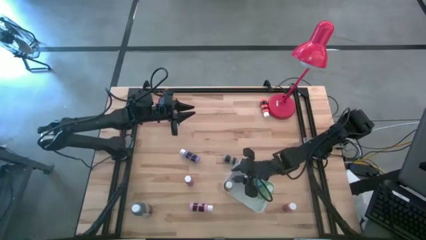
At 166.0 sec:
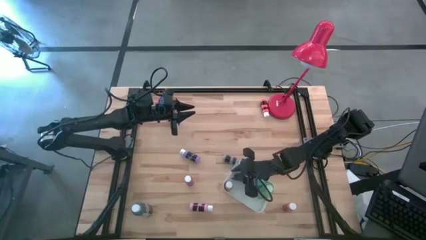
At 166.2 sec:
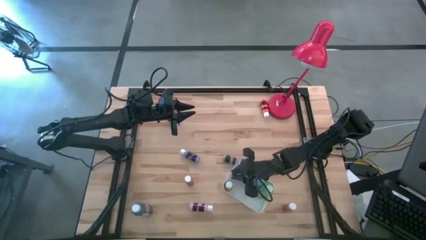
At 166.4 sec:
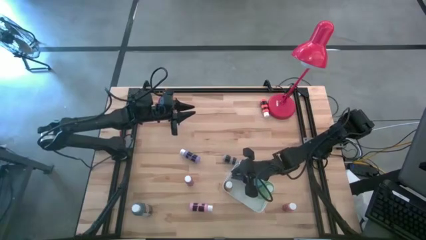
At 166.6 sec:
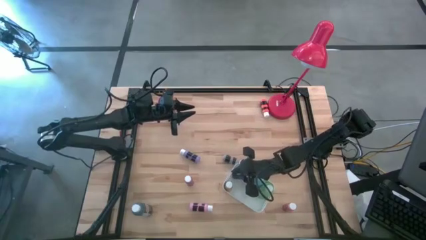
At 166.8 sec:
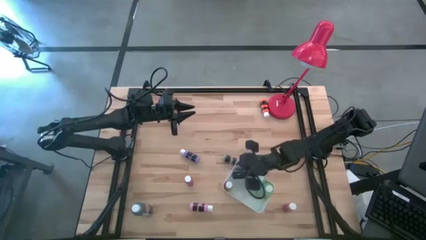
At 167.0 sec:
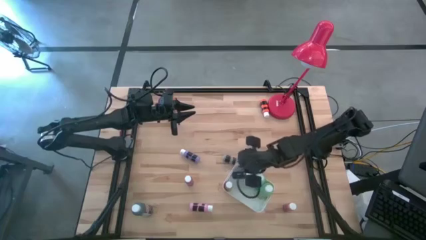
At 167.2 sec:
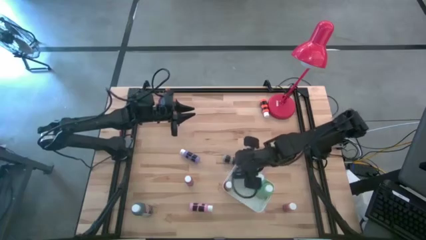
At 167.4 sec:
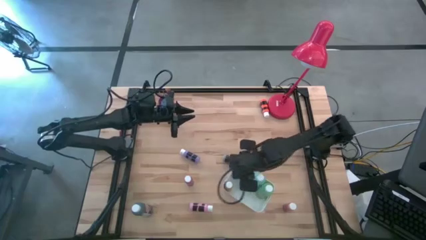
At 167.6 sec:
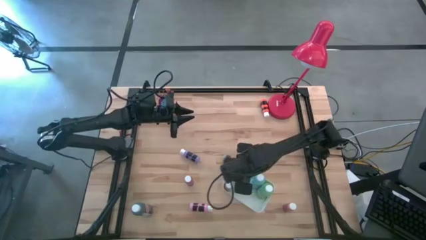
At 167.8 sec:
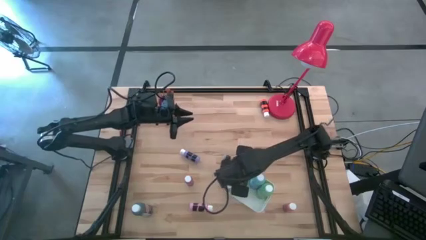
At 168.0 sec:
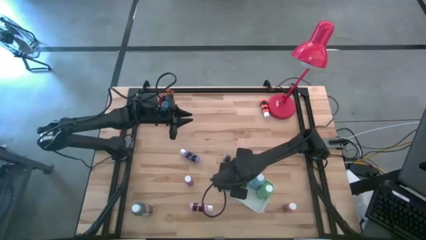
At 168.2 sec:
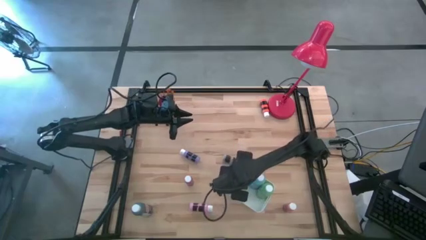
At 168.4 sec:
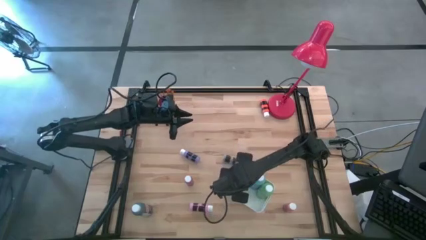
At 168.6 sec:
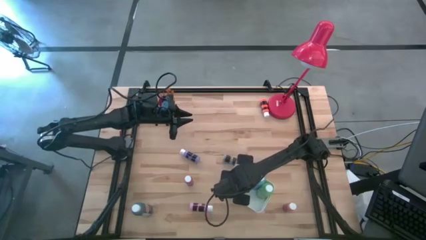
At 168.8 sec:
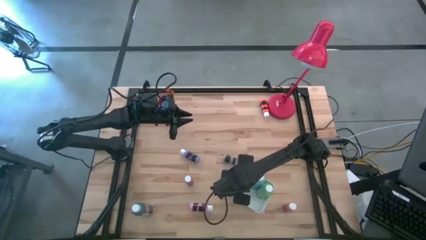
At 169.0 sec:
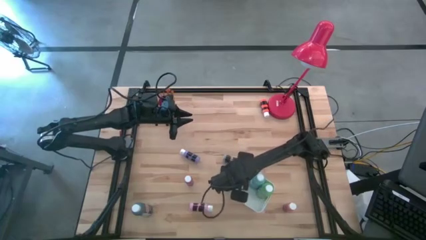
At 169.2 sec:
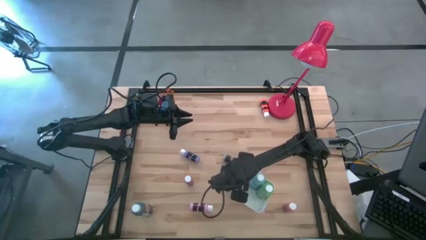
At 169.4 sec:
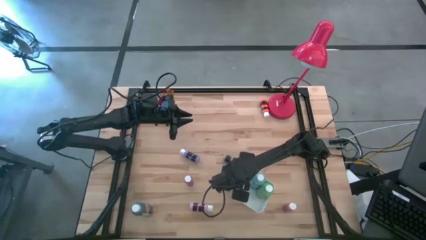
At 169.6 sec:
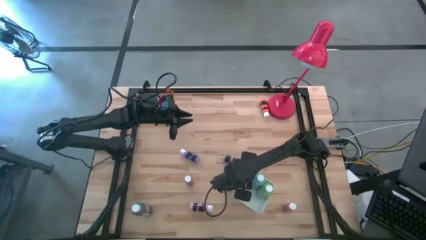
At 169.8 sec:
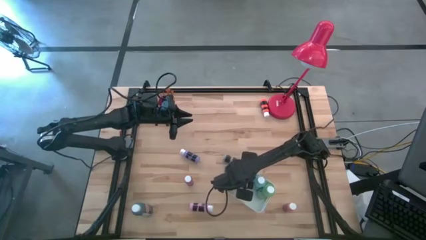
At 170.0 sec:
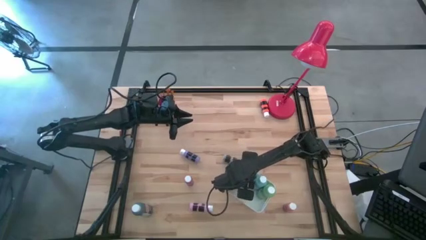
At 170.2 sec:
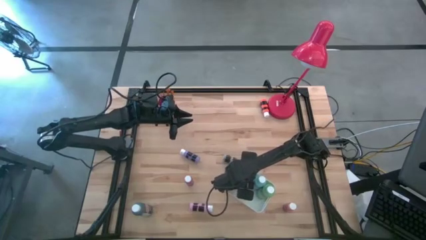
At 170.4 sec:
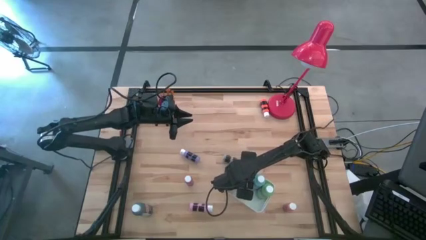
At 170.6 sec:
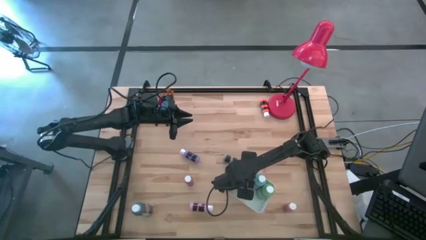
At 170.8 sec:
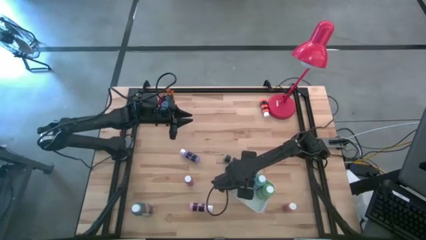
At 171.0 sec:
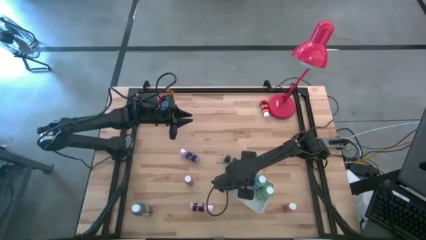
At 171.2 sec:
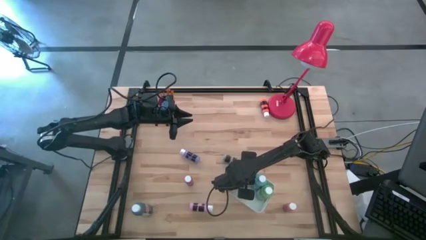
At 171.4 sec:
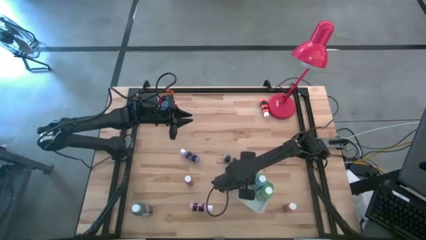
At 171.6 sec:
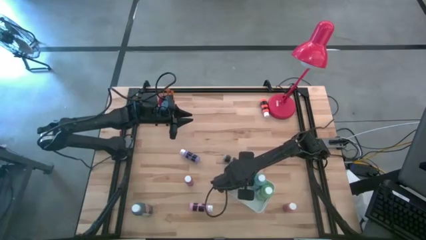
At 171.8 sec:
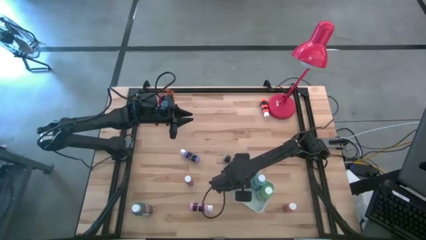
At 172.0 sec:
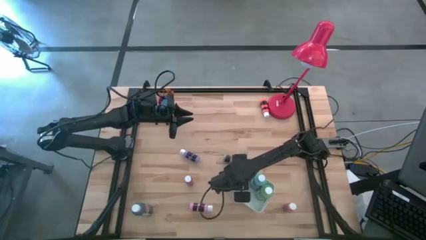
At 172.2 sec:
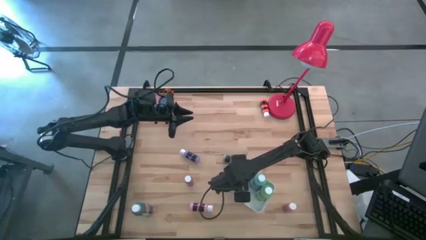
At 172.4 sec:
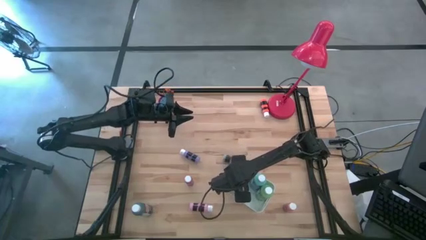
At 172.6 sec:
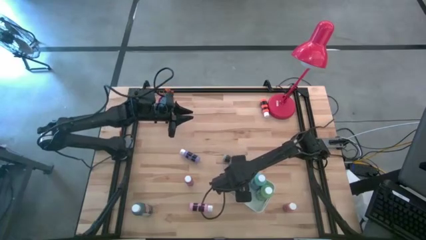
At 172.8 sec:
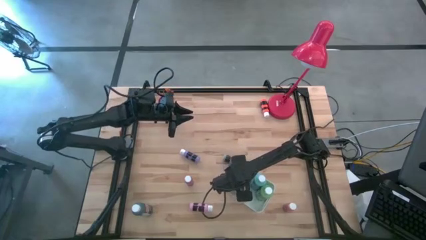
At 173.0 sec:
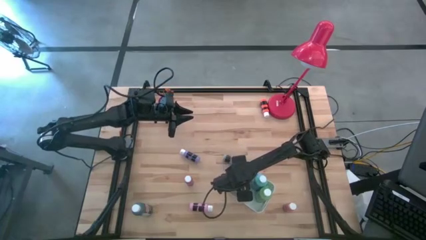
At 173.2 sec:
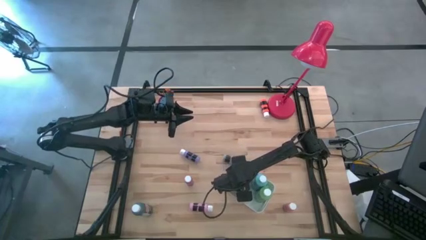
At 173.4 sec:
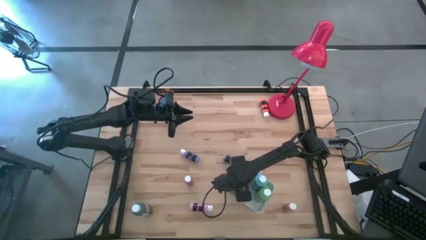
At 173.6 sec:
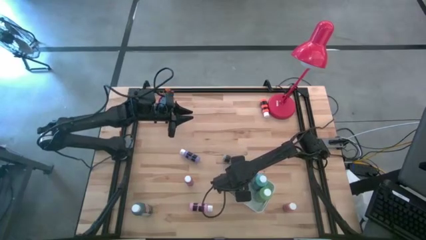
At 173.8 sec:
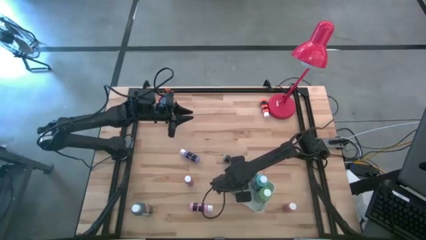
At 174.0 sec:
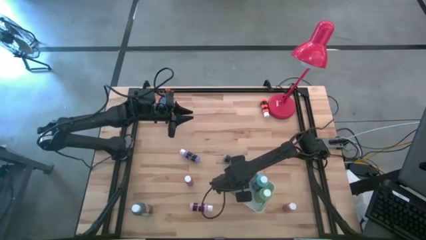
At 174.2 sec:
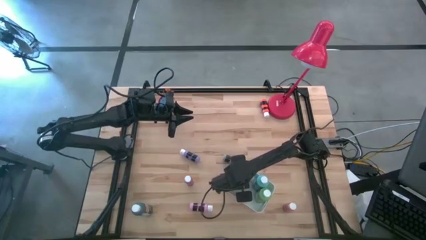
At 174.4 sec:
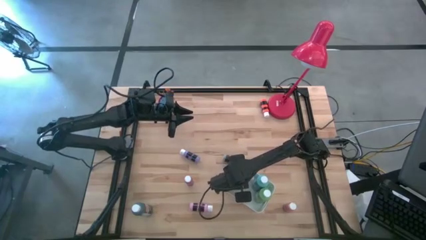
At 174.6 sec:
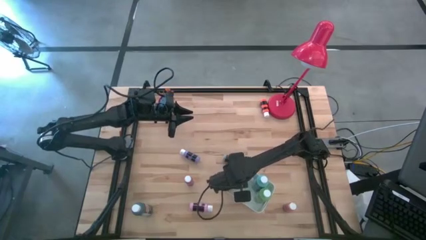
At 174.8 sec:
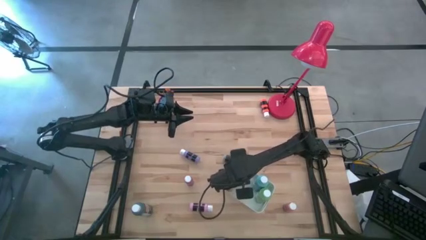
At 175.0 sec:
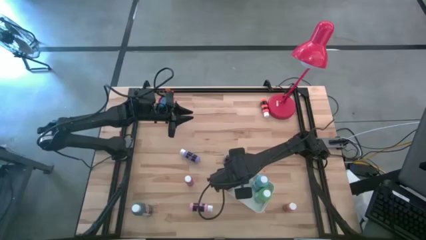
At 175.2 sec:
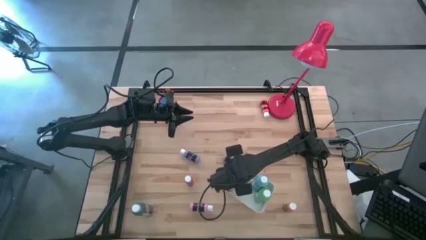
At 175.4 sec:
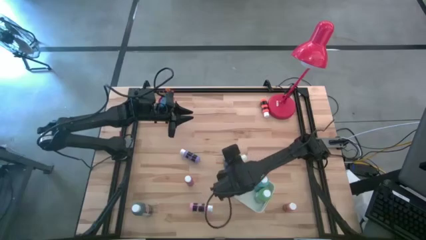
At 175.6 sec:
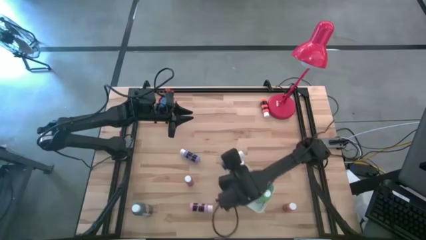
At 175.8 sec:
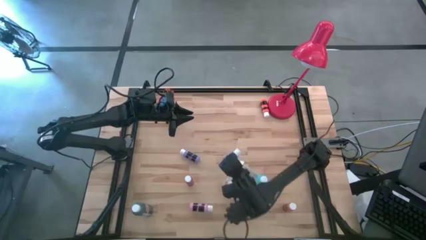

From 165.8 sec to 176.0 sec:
Task: Pick & Place Paint Supplies
Put the blue paint bottle into the white bin
